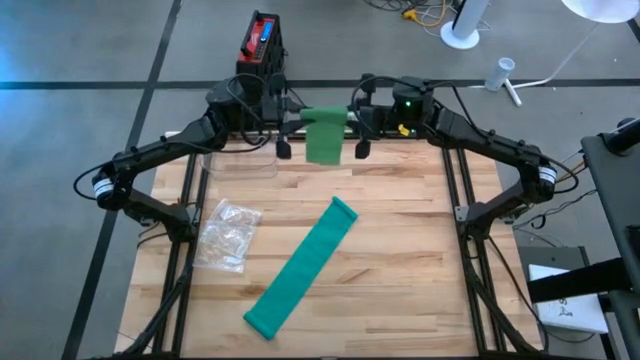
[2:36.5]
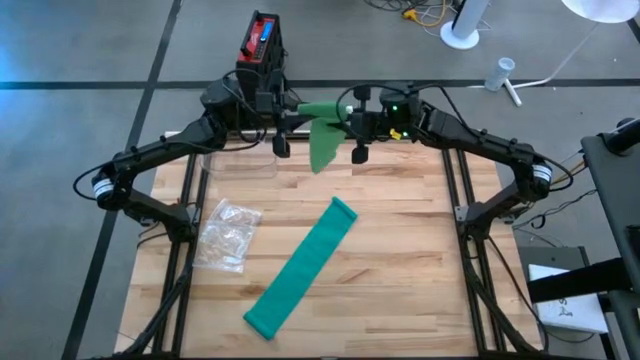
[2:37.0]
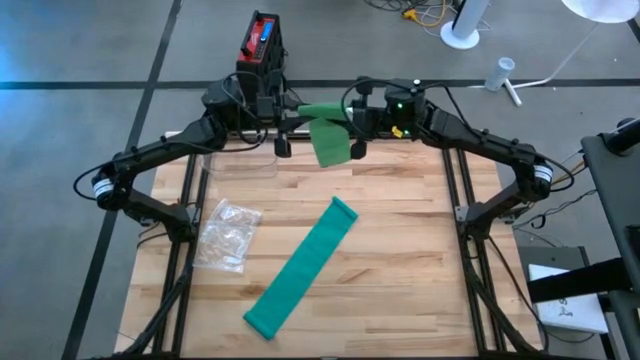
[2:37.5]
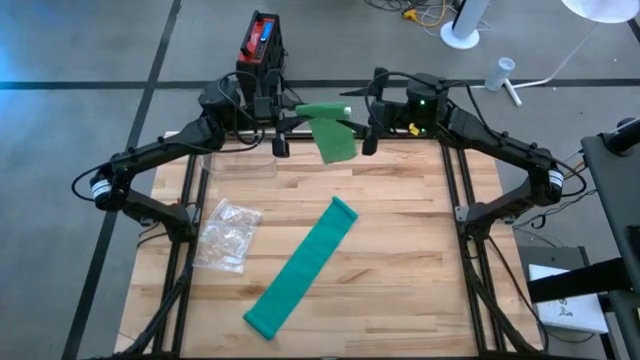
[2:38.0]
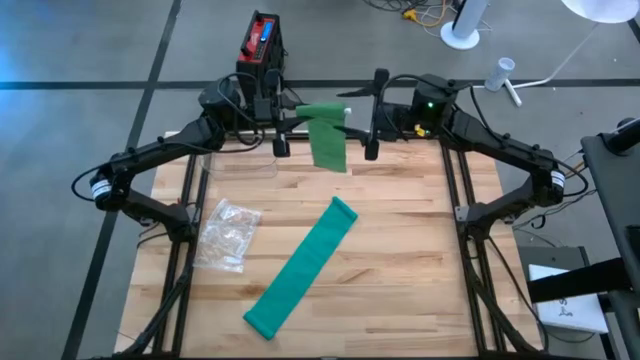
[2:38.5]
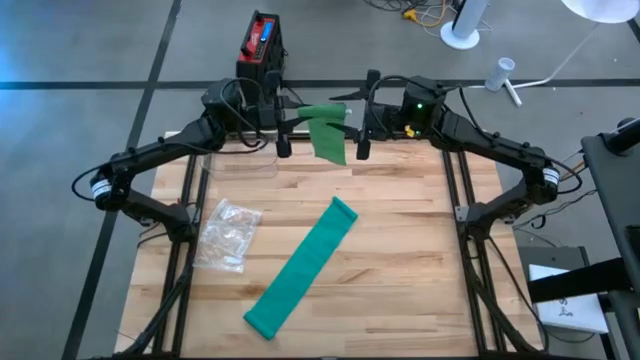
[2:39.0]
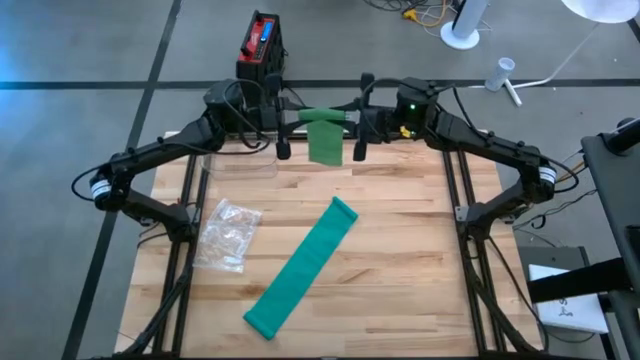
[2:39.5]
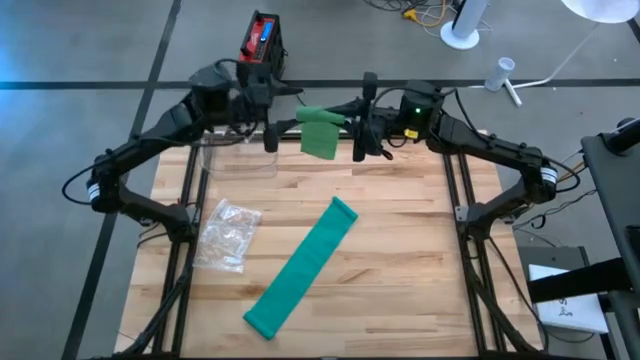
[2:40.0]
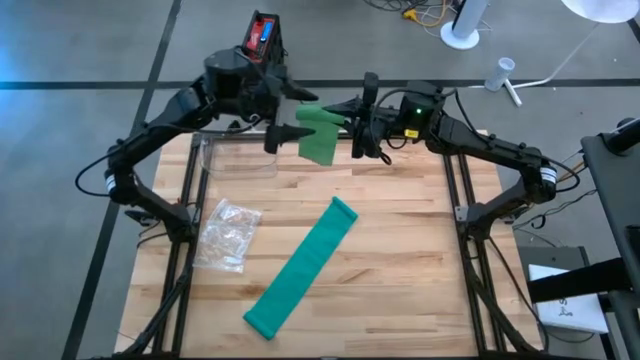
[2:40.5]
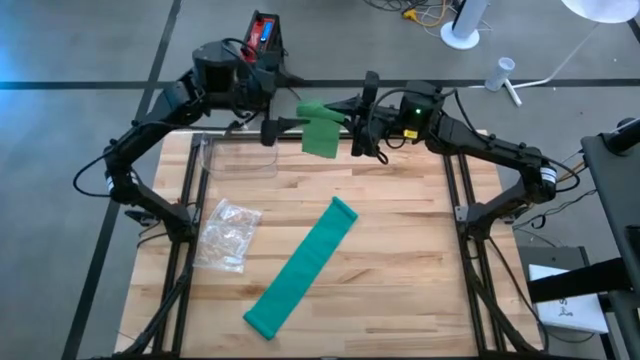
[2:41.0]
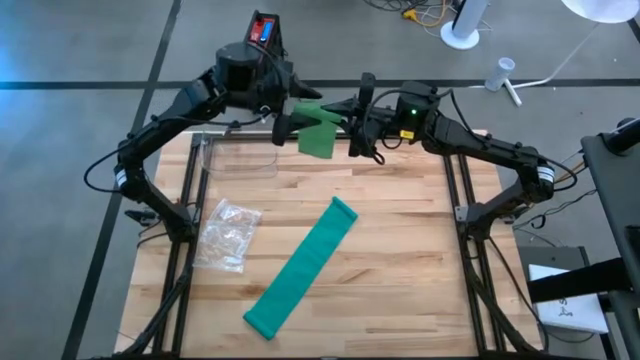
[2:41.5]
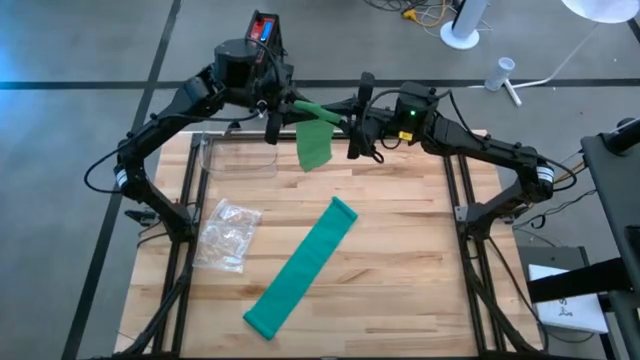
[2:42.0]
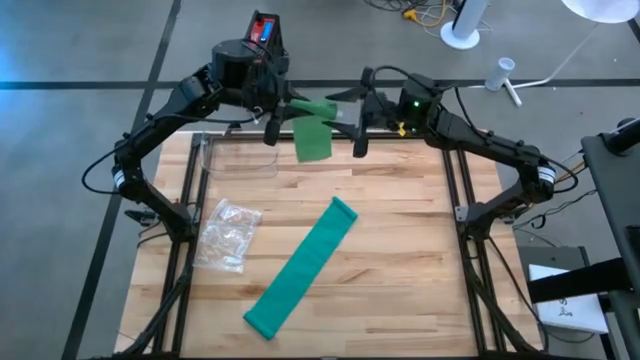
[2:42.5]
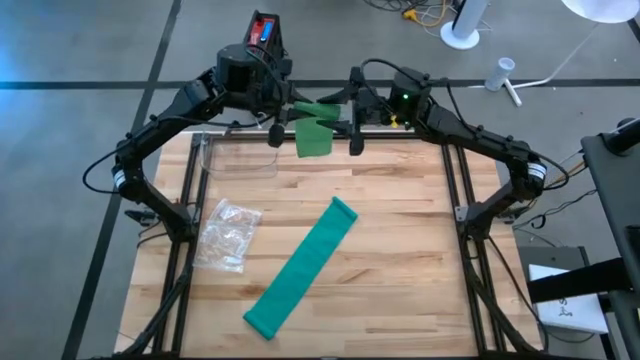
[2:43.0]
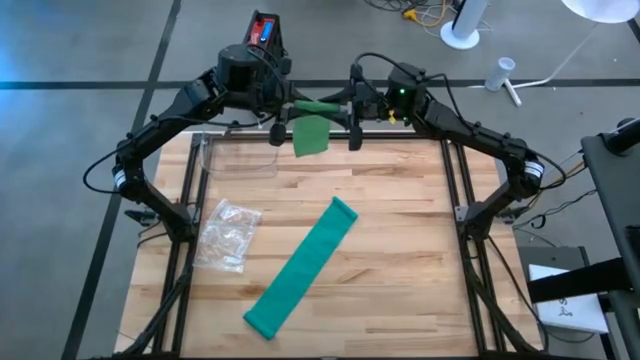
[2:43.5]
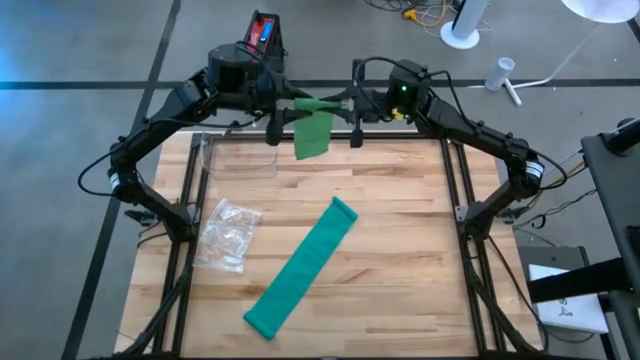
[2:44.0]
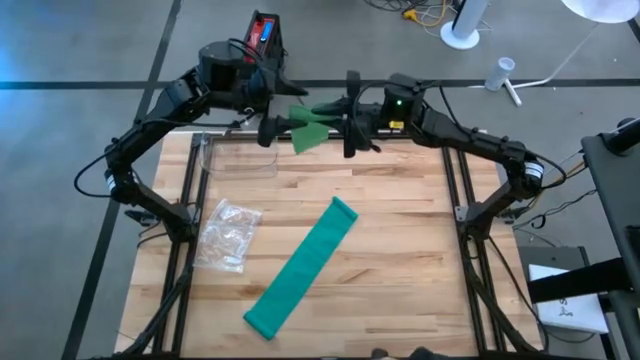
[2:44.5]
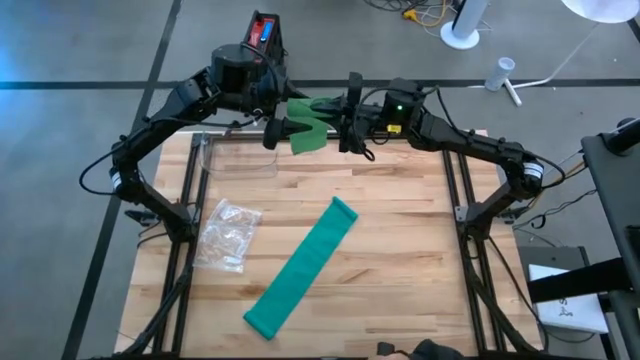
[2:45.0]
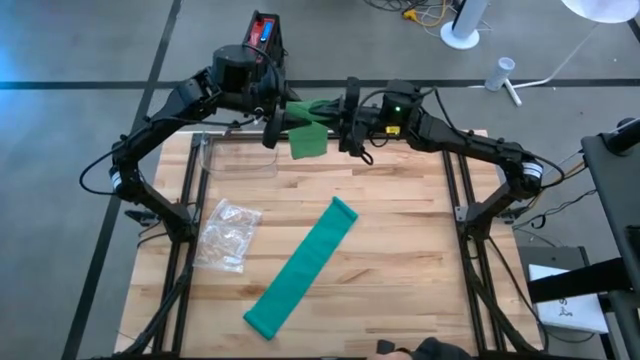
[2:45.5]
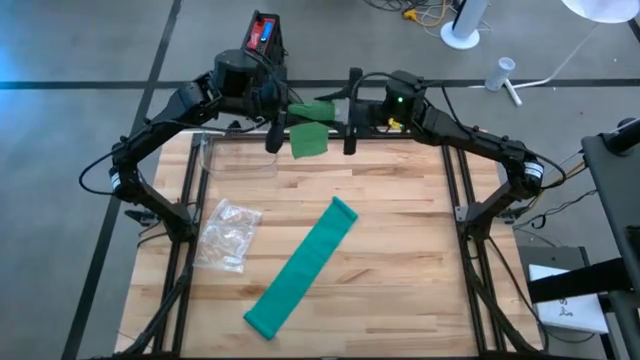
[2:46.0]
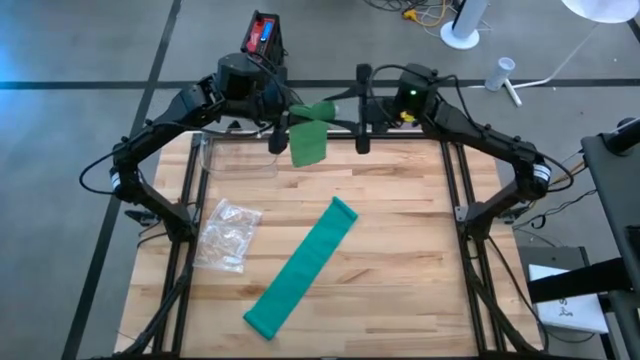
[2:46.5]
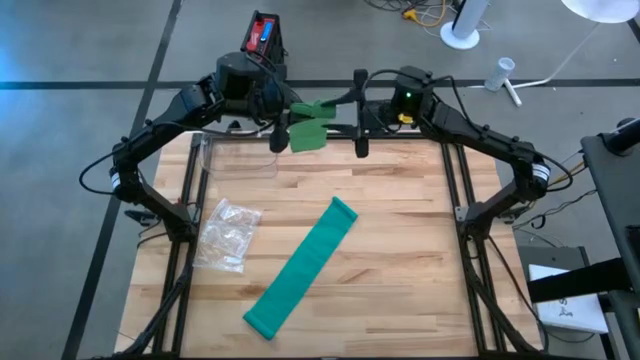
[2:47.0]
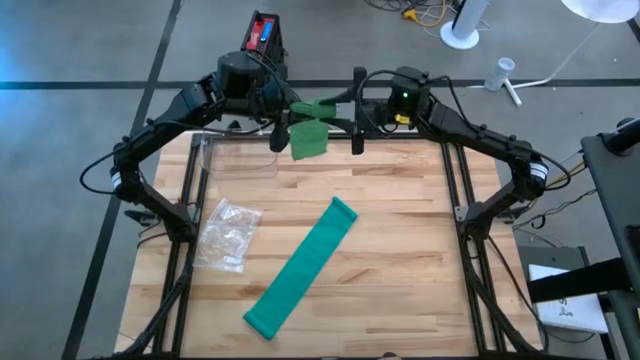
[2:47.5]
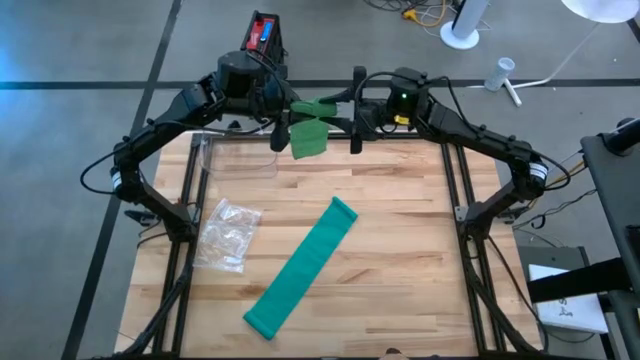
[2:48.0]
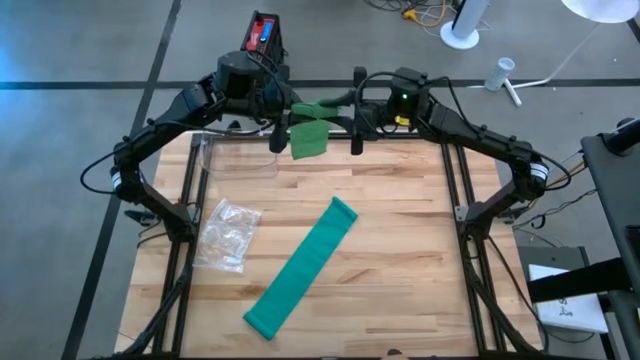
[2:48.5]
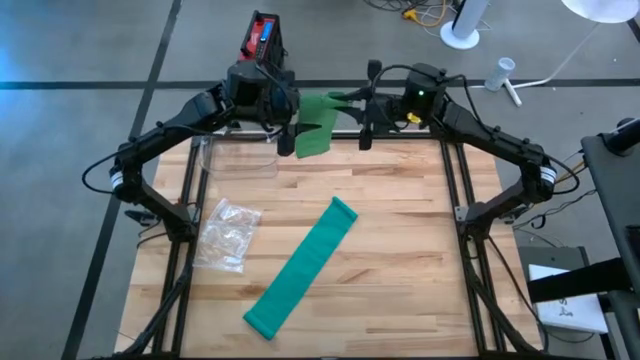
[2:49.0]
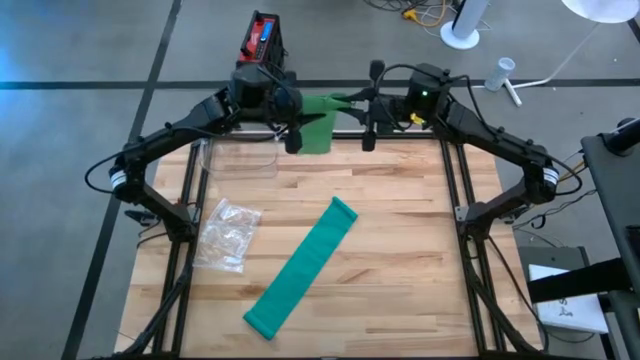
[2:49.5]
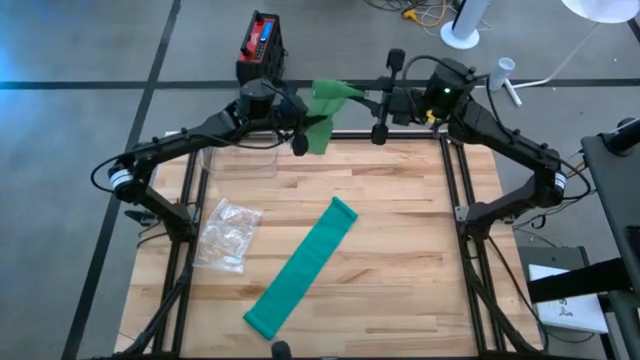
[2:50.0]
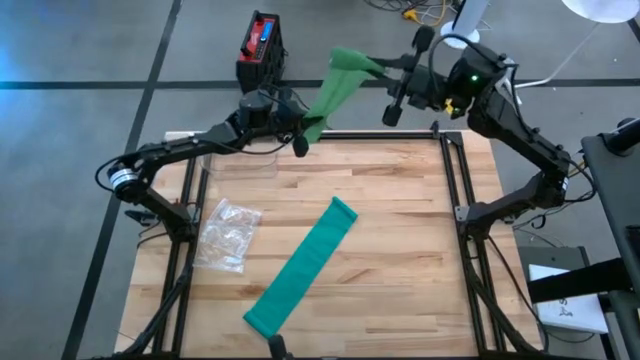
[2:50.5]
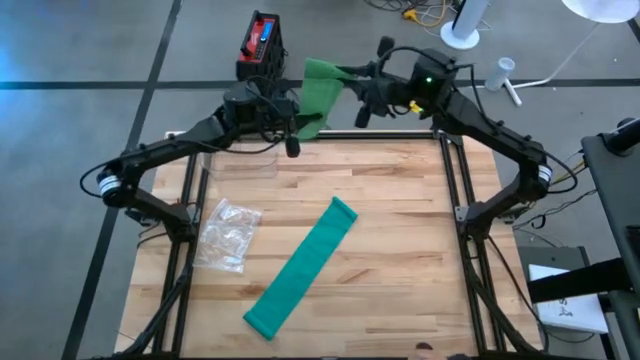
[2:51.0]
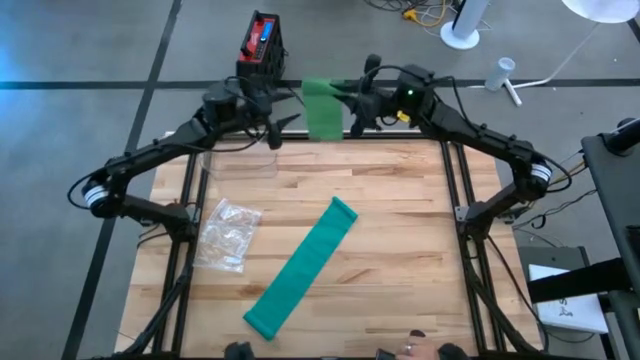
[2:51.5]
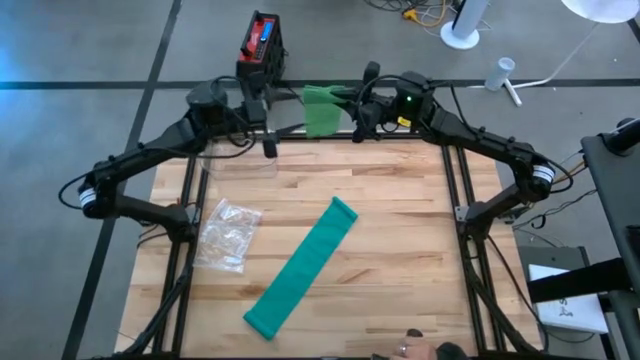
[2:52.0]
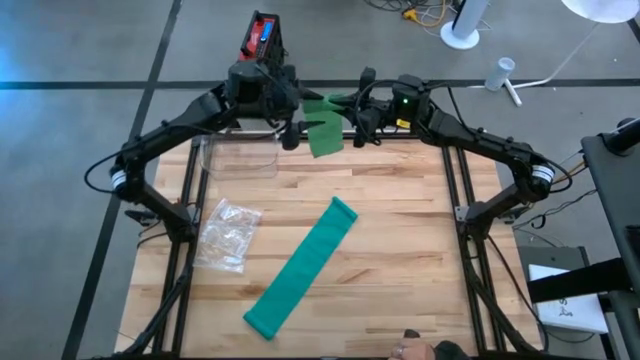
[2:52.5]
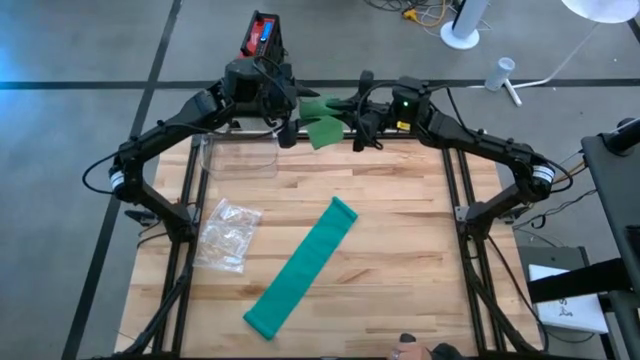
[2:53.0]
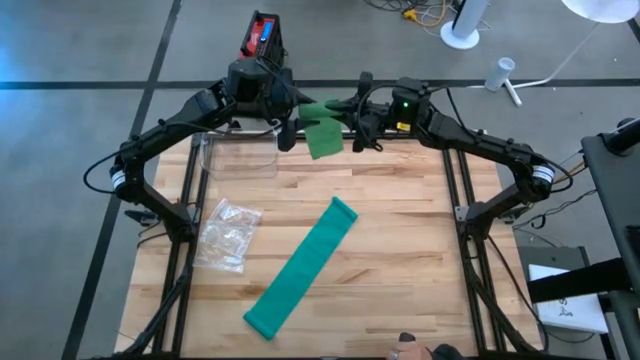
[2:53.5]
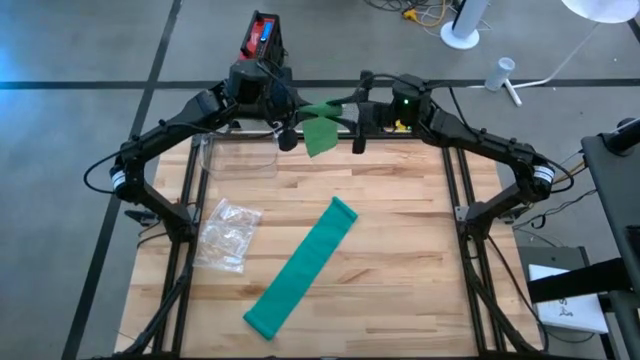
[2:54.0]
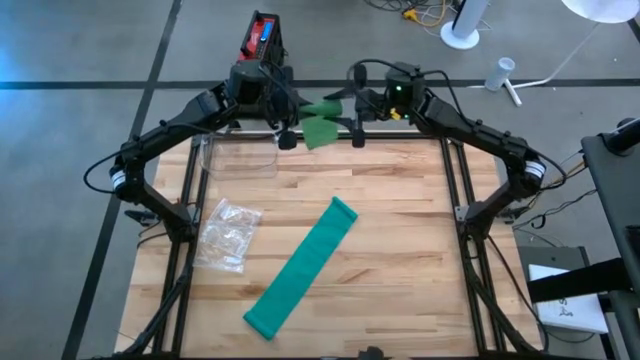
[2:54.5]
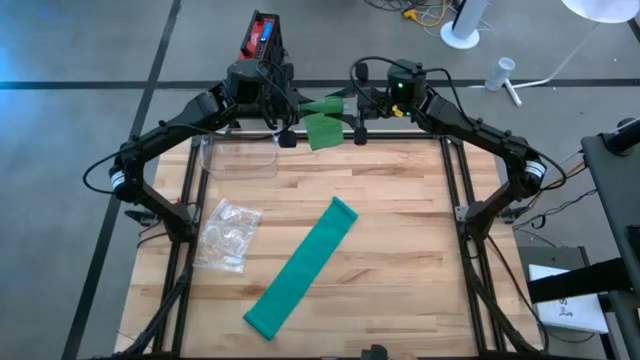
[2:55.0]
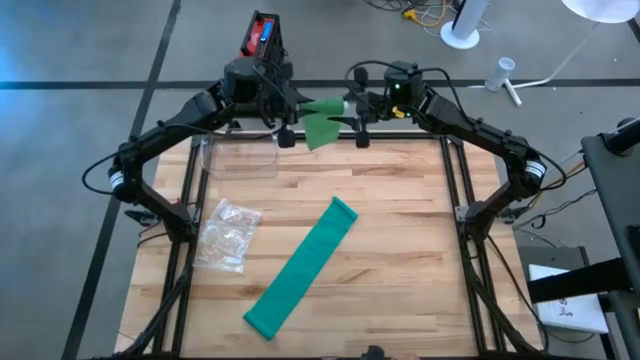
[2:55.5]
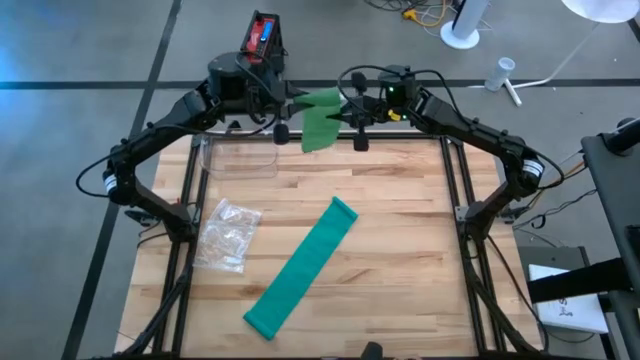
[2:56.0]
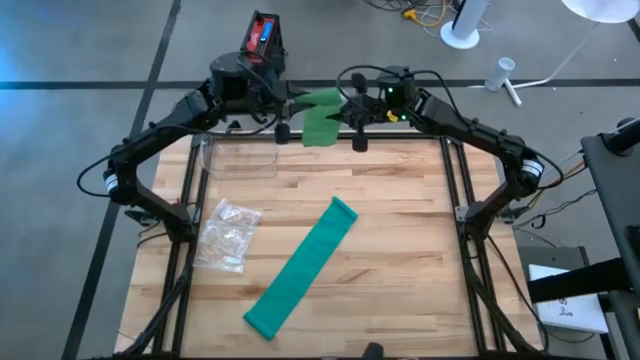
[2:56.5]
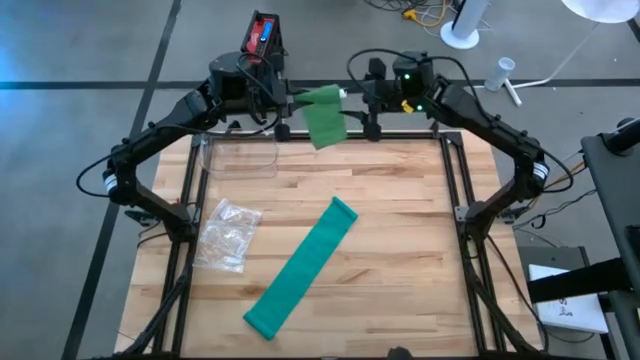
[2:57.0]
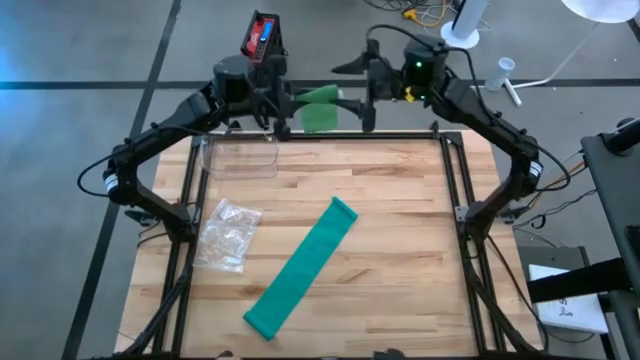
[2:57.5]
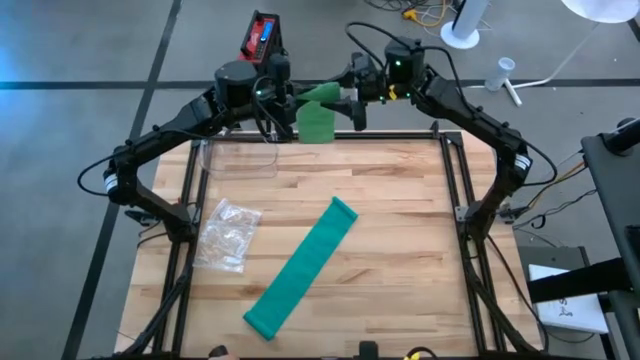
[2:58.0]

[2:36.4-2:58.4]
Task: Roll bandage
Roll the green bandage
